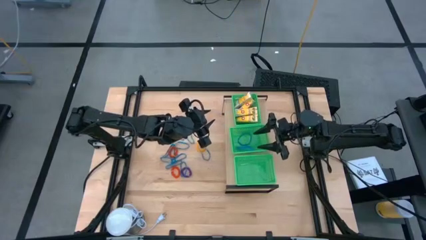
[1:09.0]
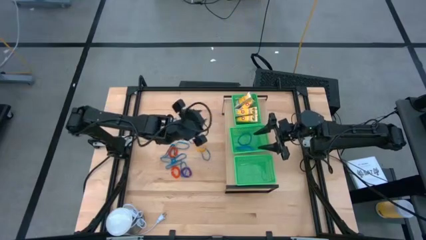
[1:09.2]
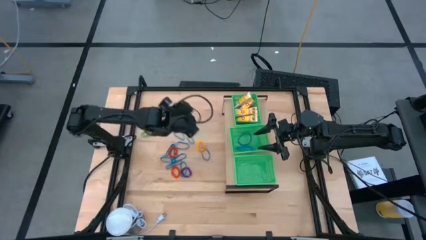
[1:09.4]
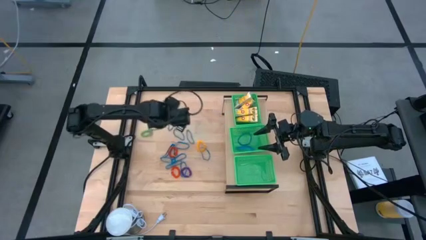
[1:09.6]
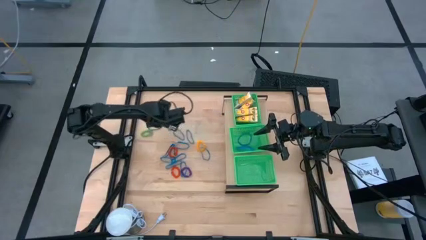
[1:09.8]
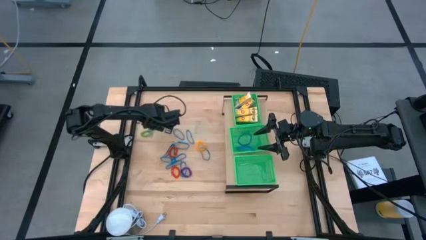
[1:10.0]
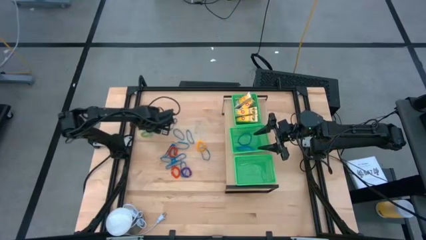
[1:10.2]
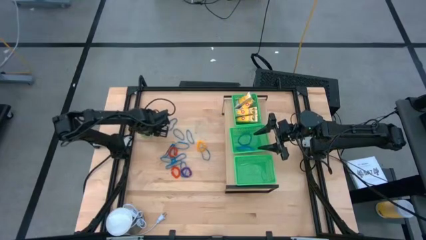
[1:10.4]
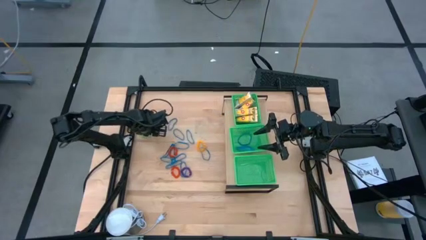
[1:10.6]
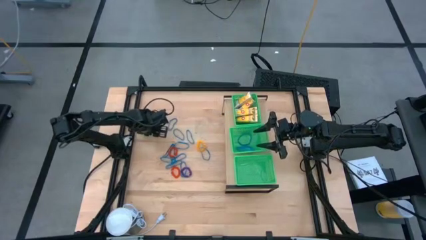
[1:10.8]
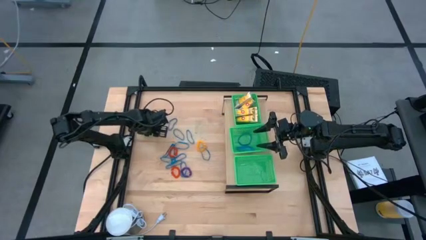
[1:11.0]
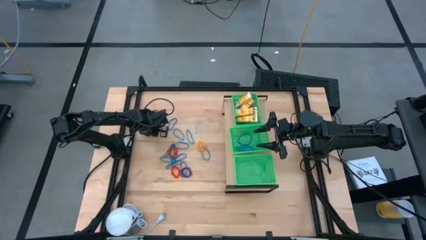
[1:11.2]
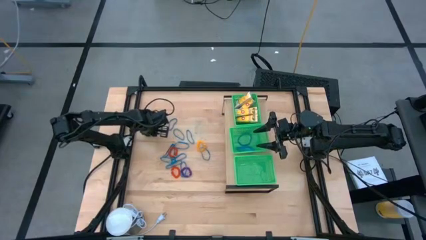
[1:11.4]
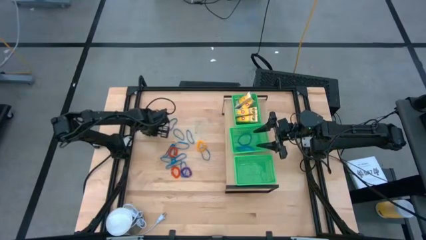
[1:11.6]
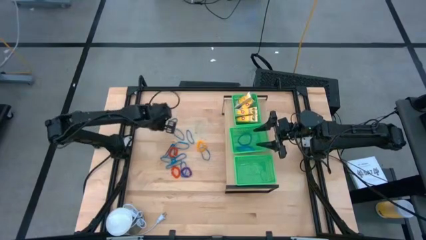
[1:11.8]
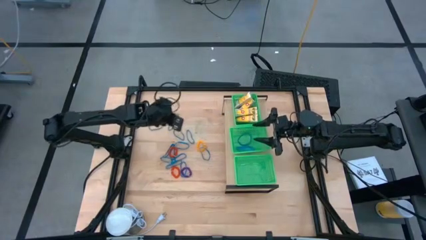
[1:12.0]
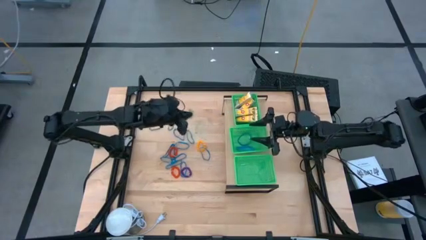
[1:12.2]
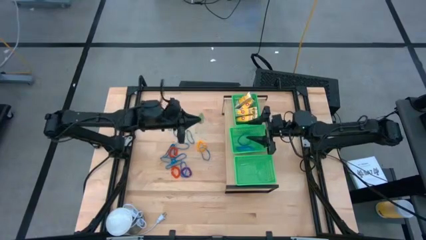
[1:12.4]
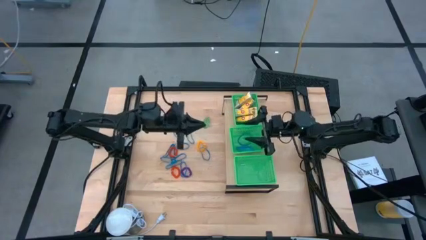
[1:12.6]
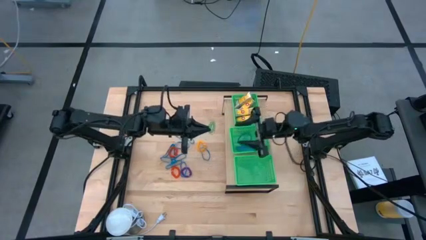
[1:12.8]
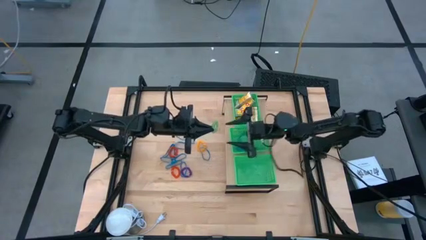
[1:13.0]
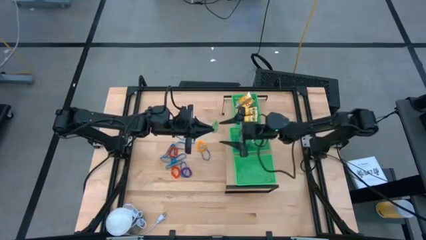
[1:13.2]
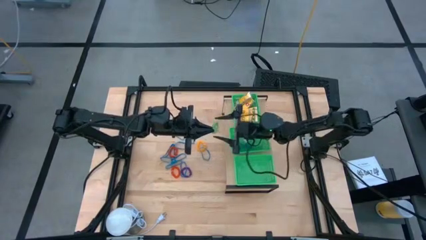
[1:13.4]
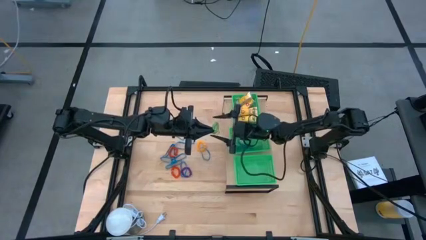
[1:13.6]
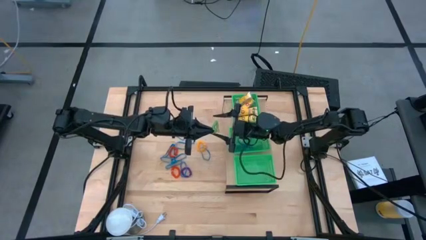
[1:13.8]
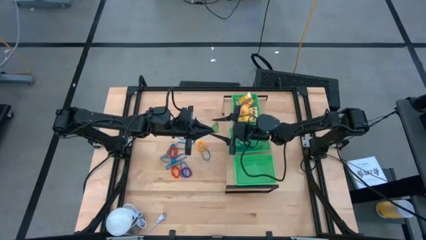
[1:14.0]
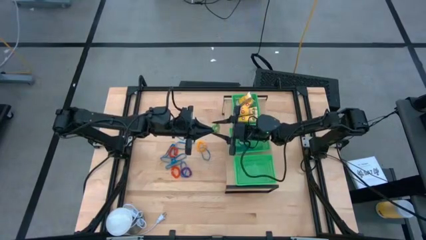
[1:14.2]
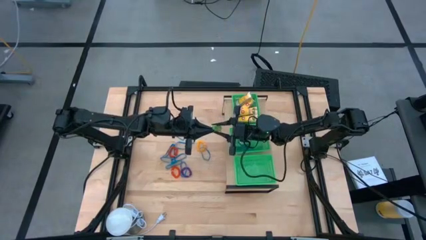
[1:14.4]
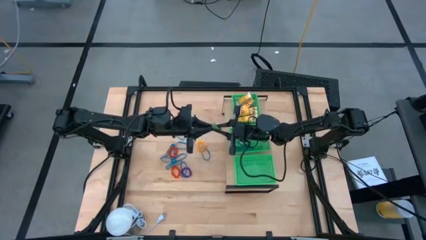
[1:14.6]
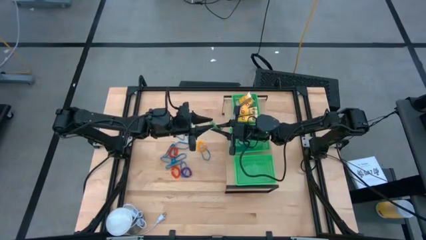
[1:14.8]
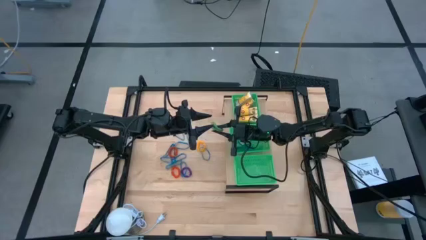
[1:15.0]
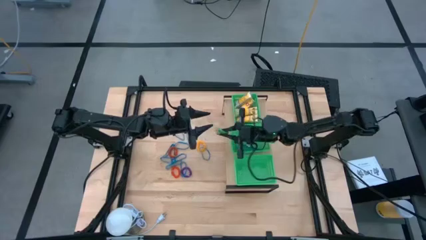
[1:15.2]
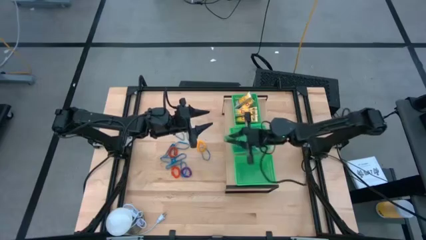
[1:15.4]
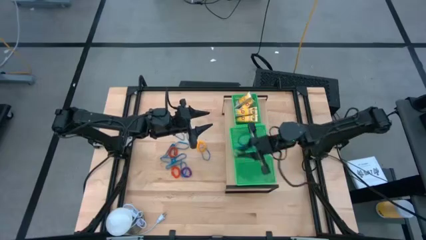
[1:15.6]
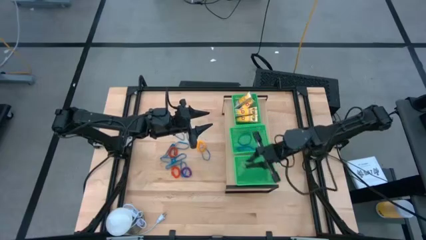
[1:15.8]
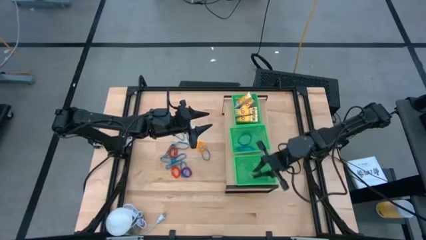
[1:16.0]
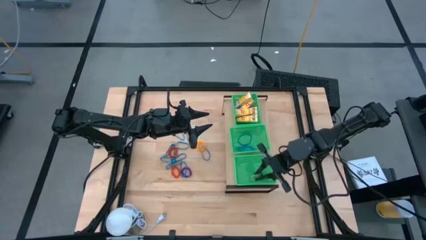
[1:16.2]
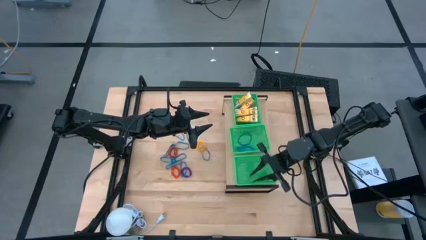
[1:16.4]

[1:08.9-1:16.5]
Task: Pick & Place Office Desk Supplies
Put the green spring keychain into the bottom green bin

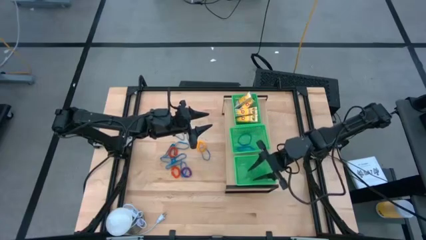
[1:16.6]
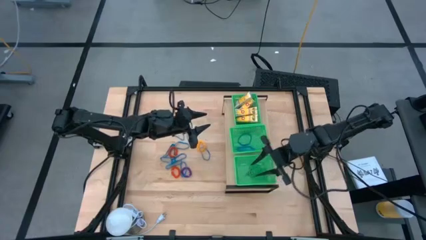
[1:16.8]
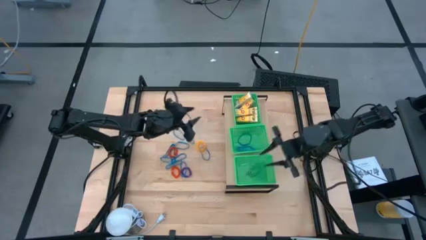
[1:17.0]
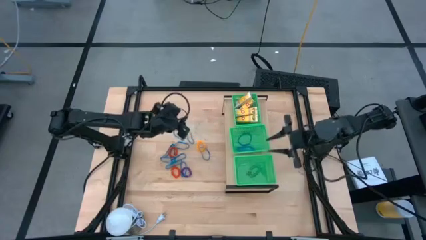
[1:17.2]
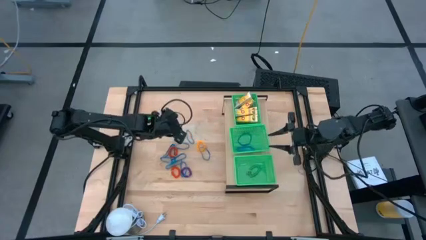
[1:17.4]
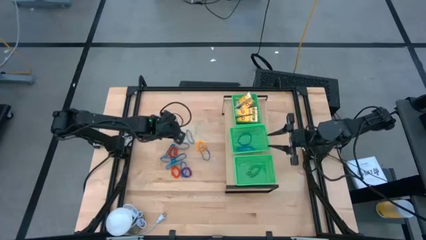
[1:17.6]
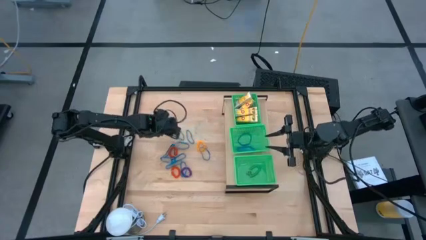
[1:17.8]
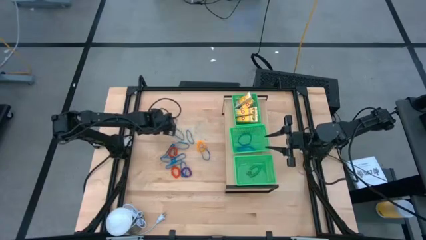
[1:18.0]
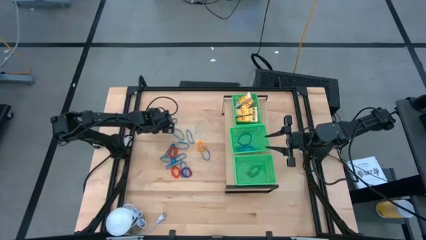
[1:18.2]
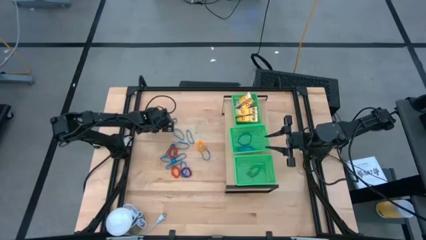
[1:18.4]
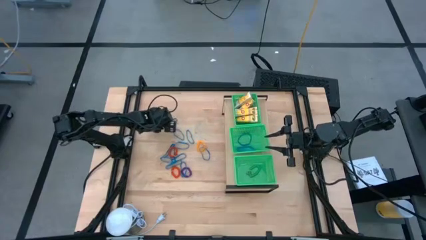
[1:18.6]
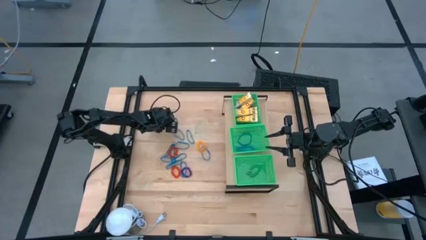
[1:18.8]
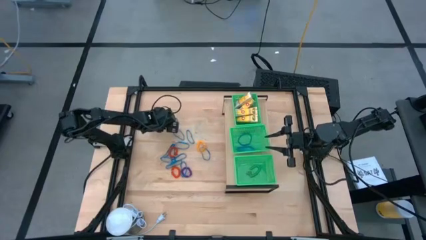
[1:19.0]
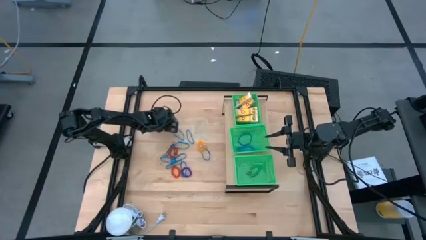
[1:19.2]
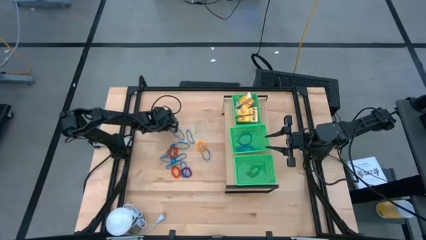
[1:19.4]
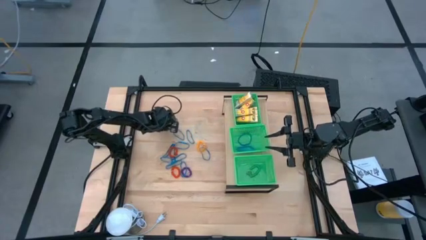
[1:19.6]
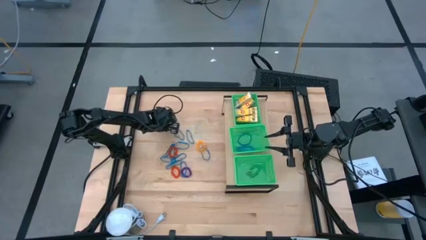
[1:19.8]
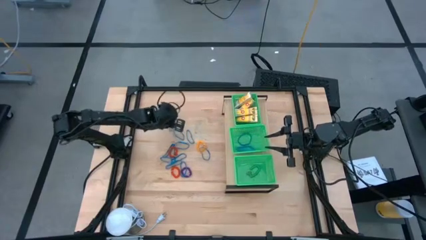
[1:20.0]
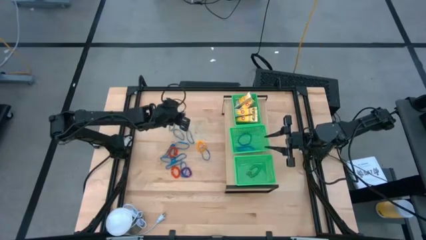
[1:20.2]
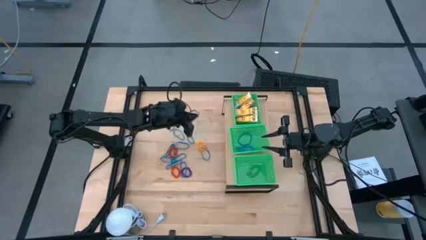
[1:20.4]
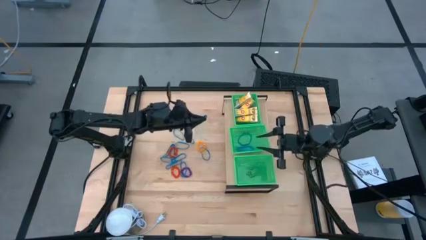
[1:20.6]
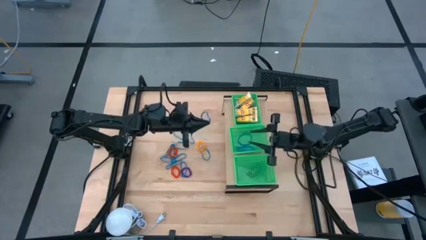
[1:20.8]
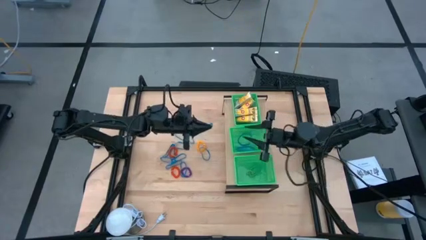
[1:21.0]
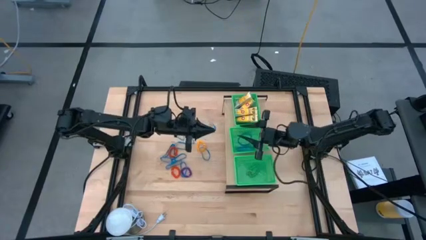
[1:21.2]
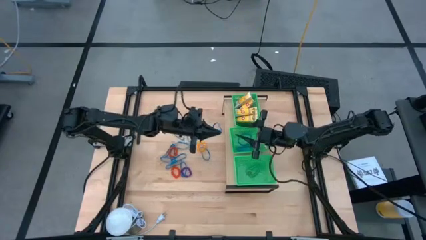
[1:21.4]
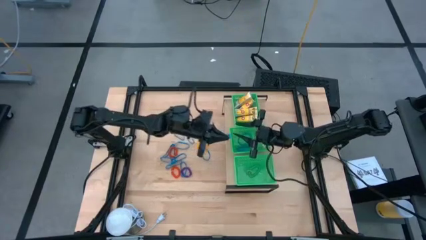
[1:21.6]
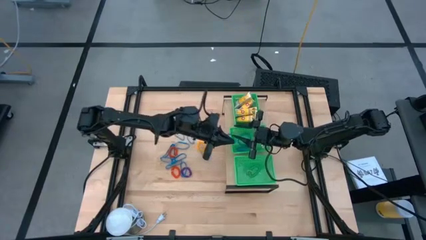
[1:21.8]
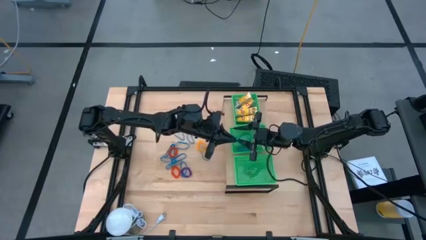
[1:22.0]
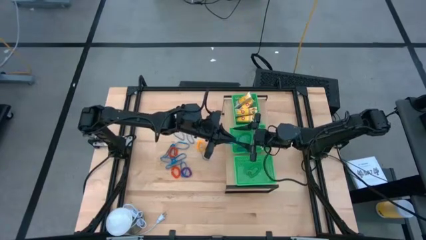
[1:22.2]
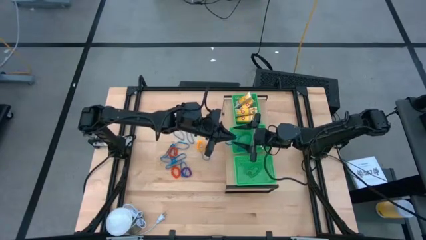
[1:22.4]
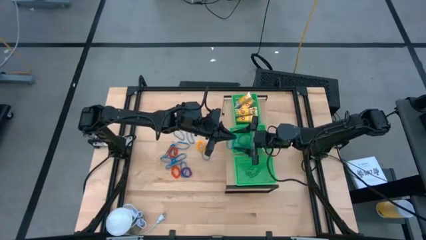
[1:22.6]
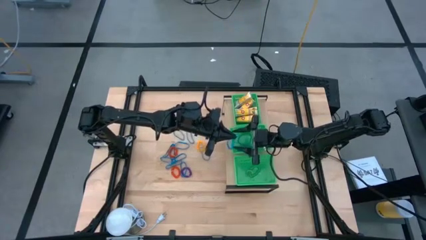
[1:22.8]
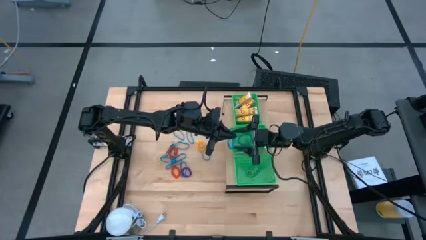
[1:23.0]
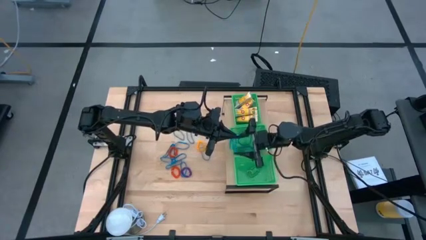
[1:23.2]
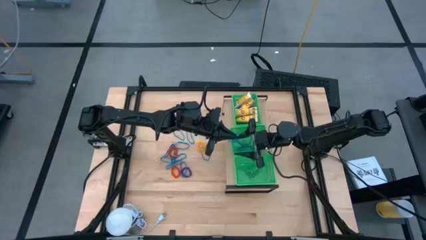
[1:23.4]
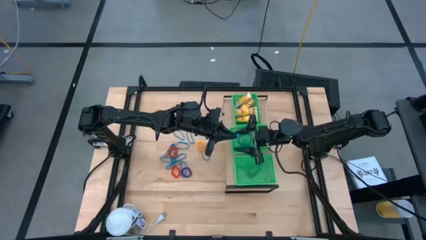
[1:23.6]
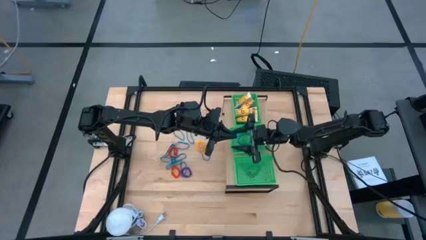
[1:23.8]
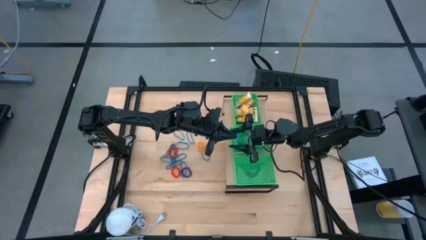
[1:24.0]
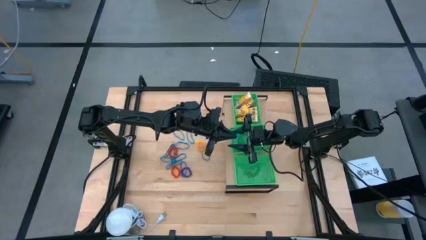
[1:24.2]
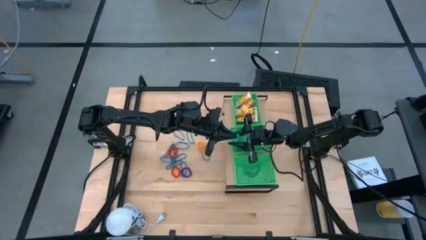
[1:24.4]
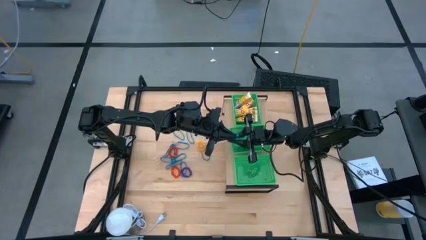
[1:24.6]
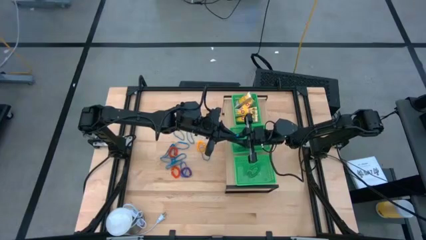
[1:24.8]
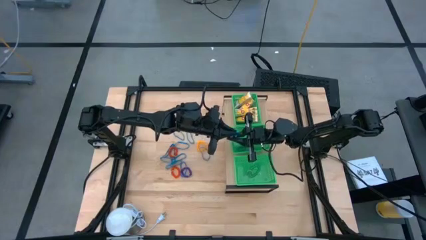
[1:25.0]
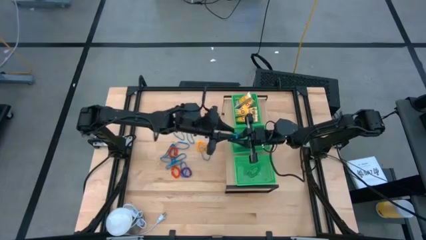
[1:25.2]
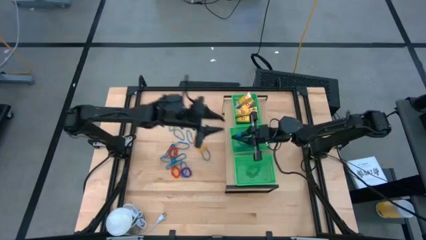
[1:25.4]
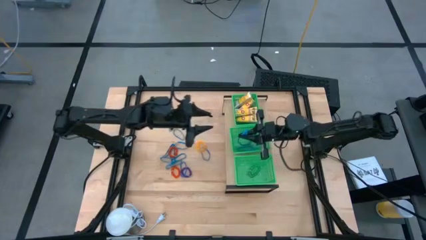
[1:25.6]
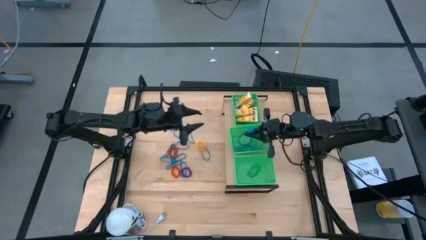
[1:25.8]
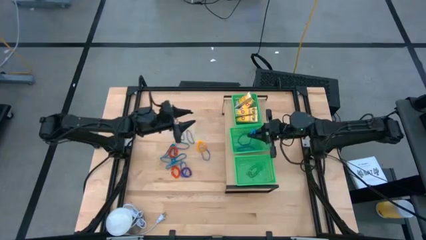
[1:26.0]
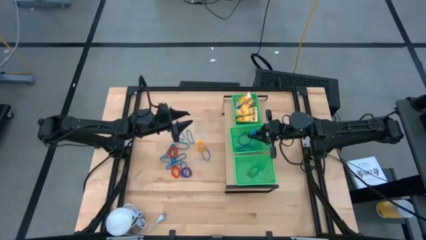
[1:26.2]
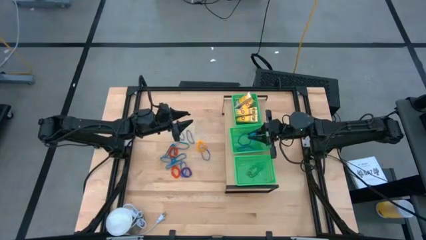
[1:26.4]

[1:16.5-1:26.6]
Put the blue rubber band into the middle green bin
